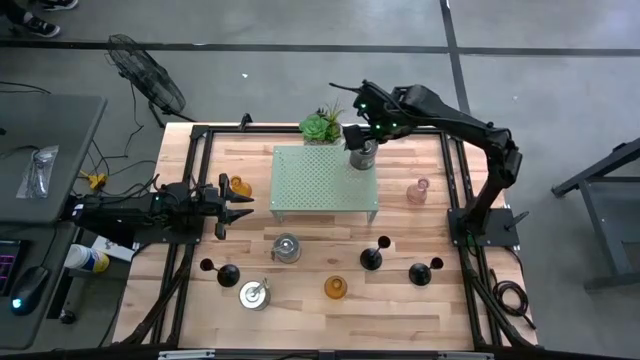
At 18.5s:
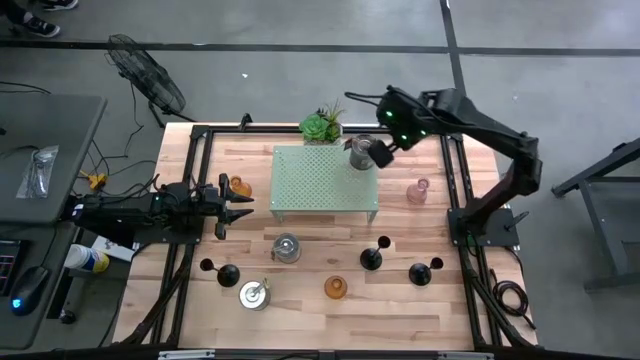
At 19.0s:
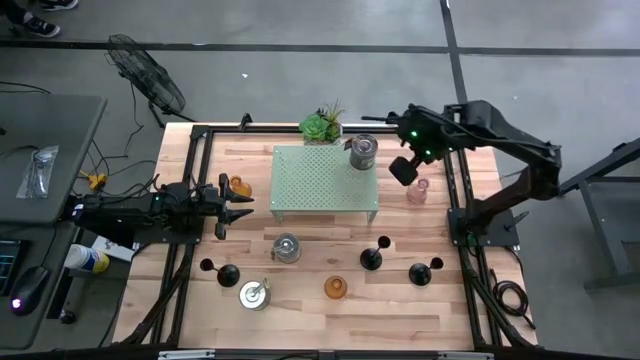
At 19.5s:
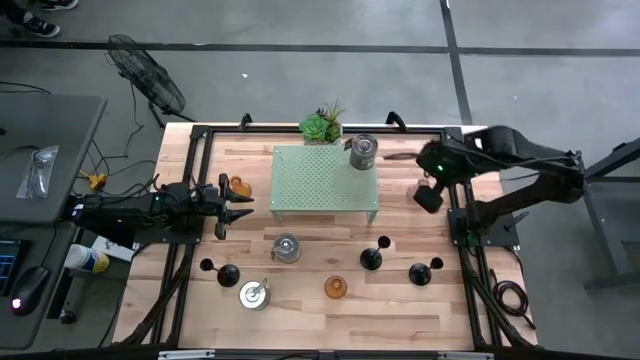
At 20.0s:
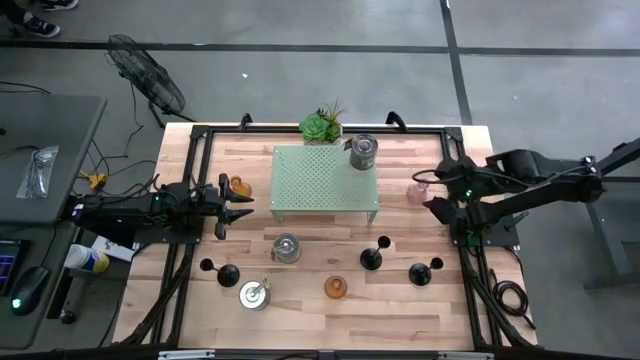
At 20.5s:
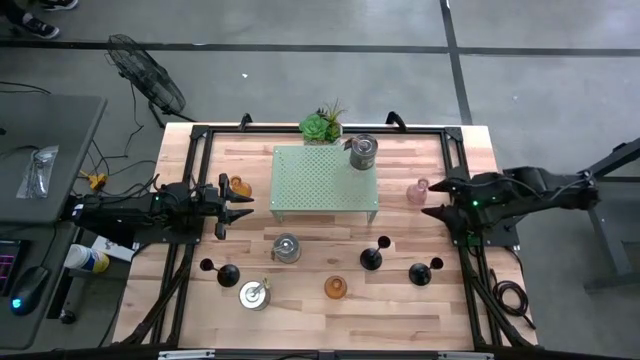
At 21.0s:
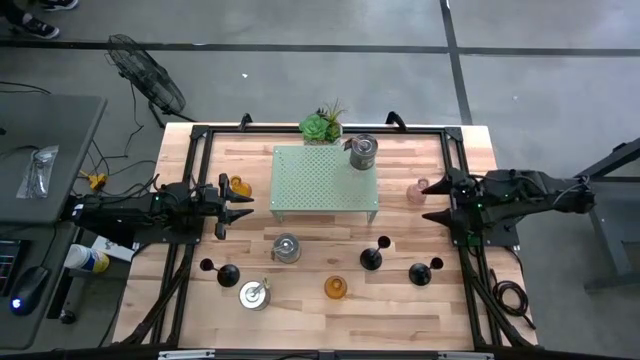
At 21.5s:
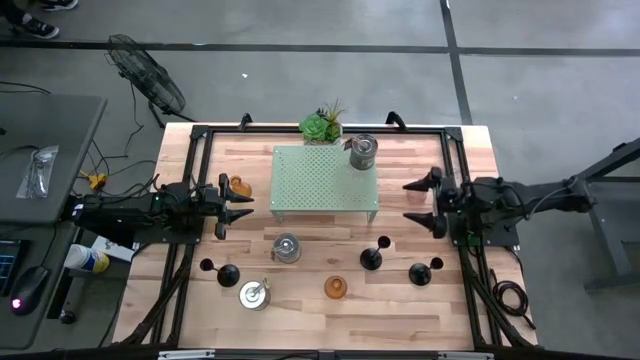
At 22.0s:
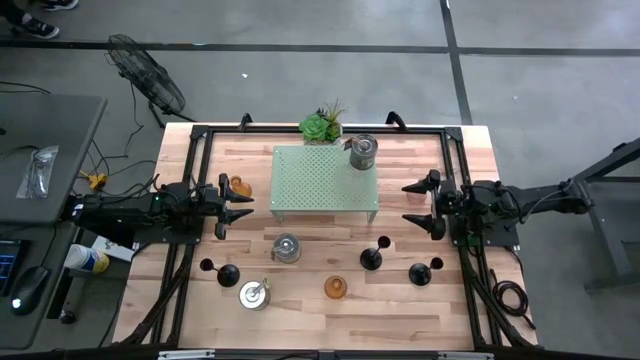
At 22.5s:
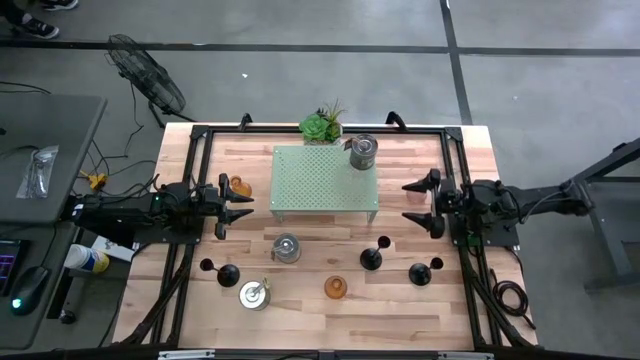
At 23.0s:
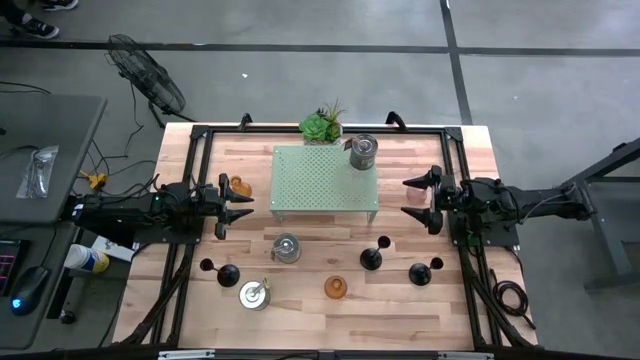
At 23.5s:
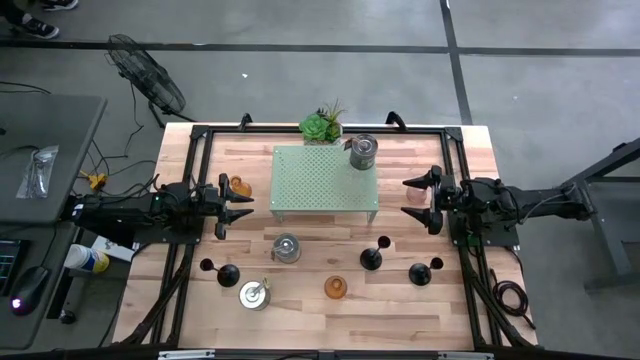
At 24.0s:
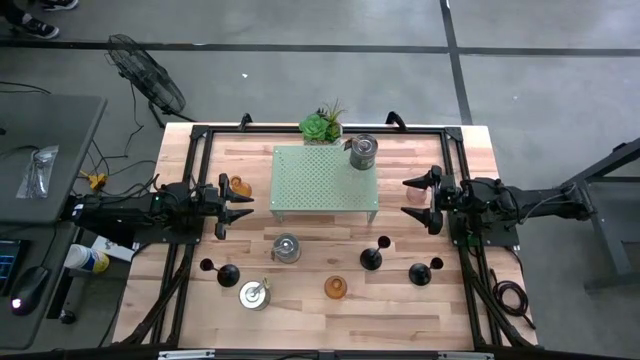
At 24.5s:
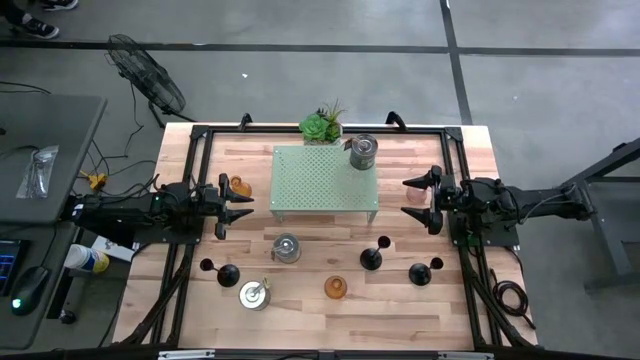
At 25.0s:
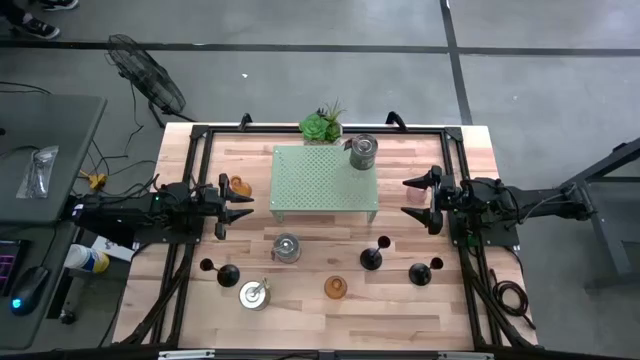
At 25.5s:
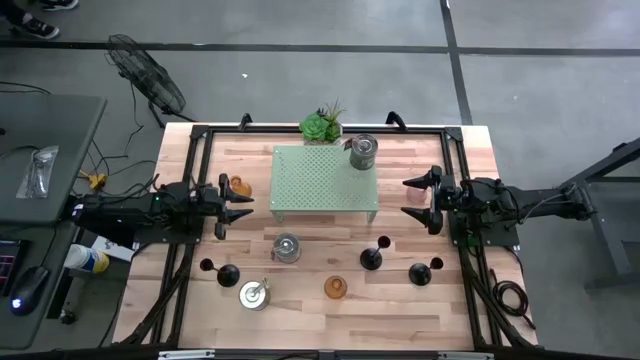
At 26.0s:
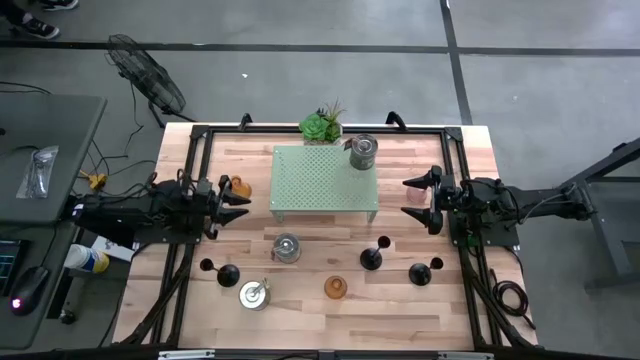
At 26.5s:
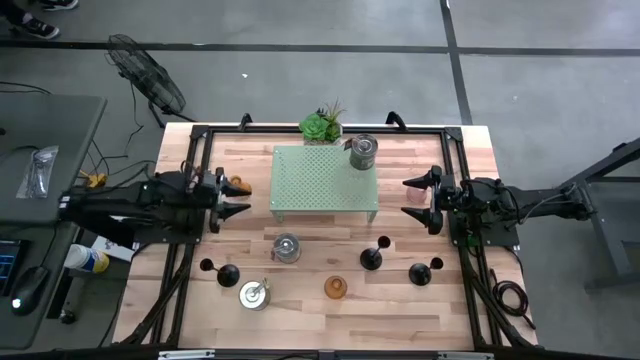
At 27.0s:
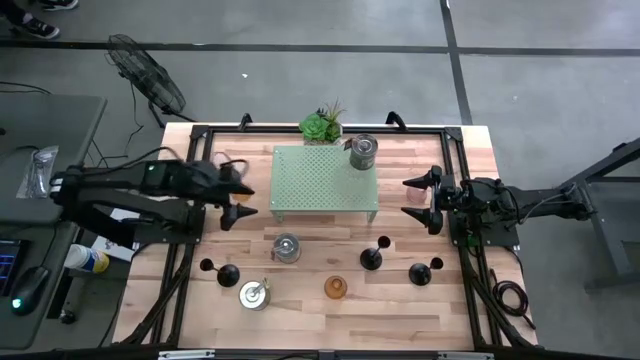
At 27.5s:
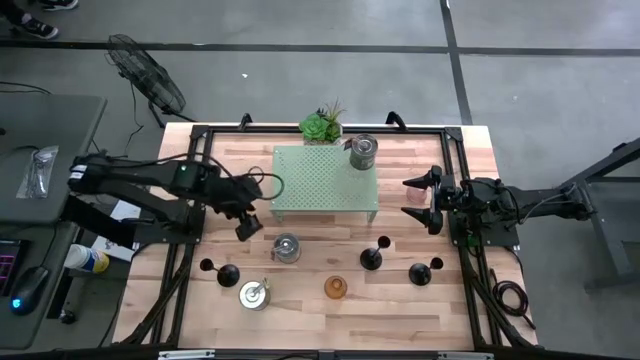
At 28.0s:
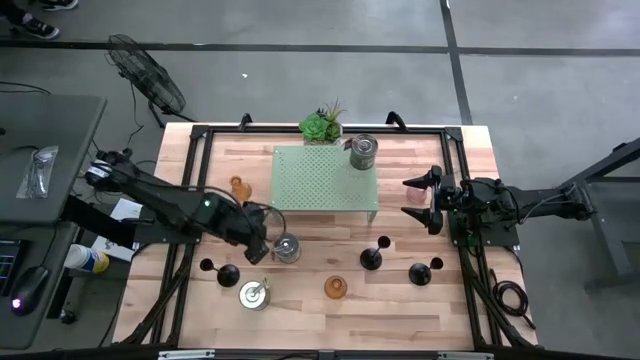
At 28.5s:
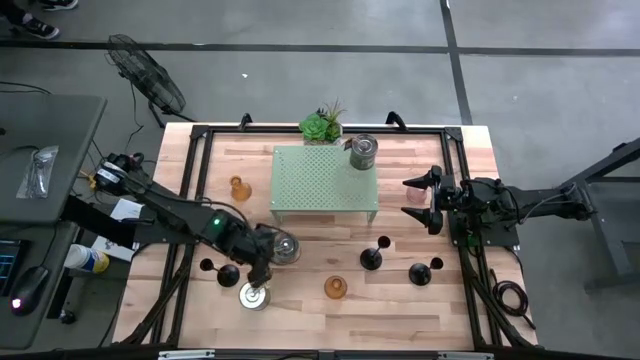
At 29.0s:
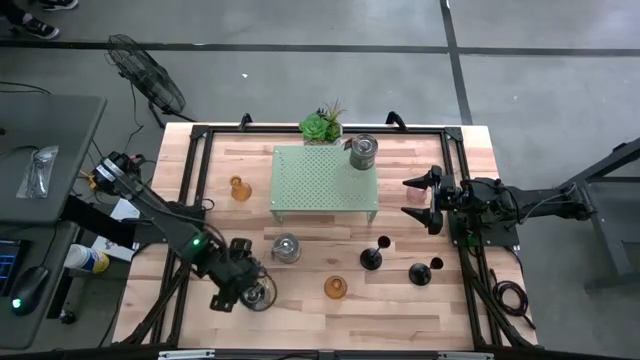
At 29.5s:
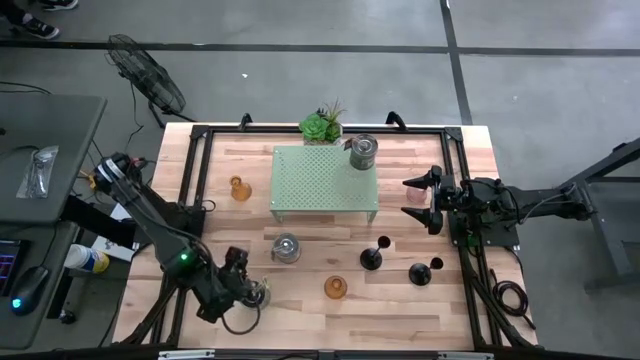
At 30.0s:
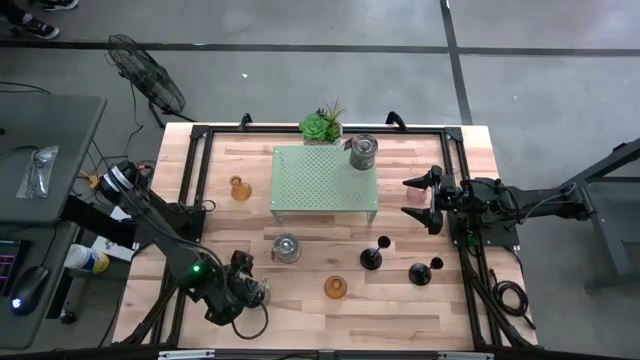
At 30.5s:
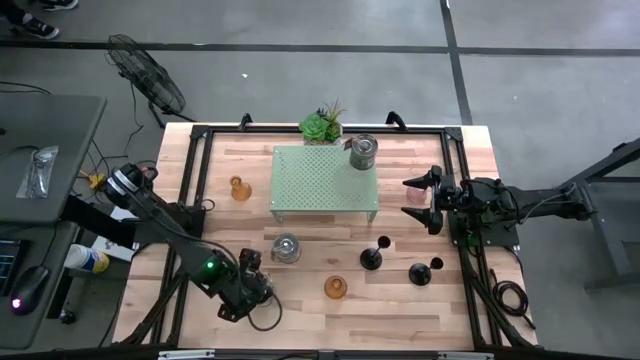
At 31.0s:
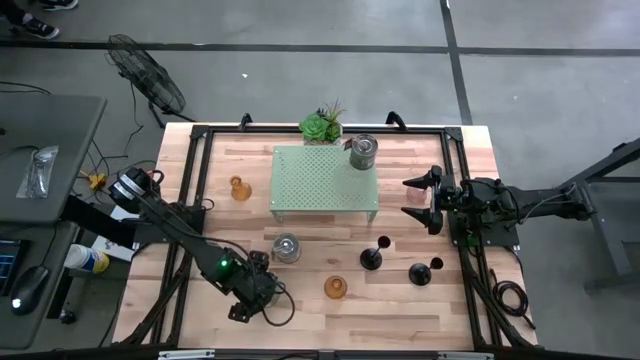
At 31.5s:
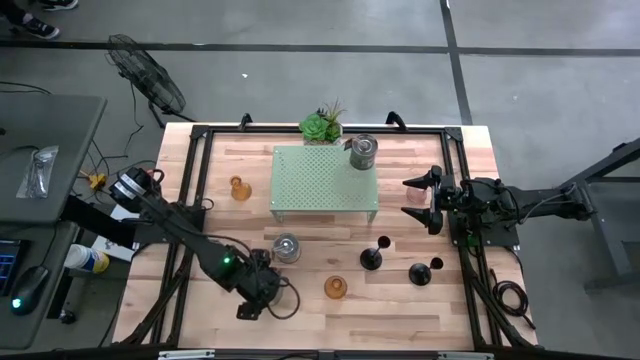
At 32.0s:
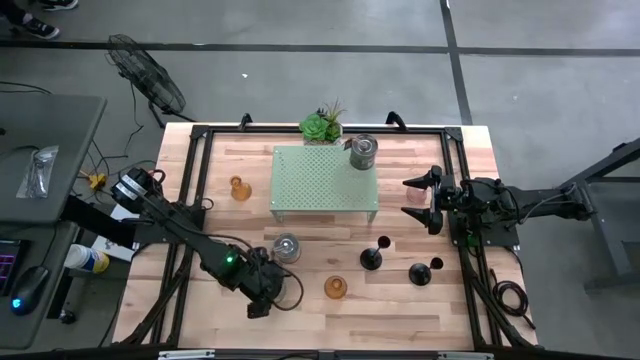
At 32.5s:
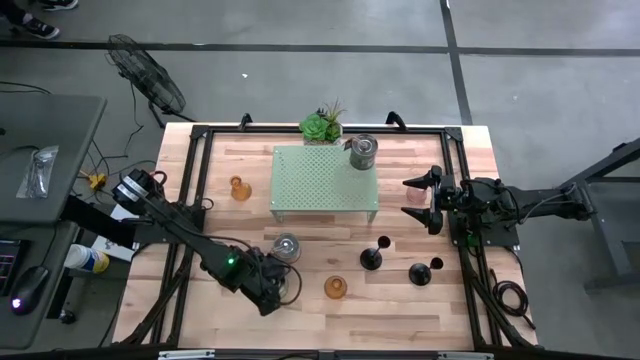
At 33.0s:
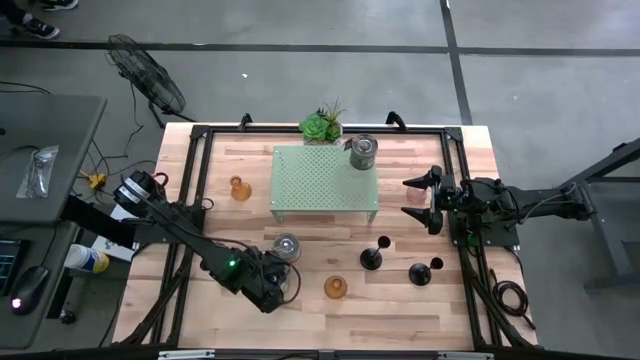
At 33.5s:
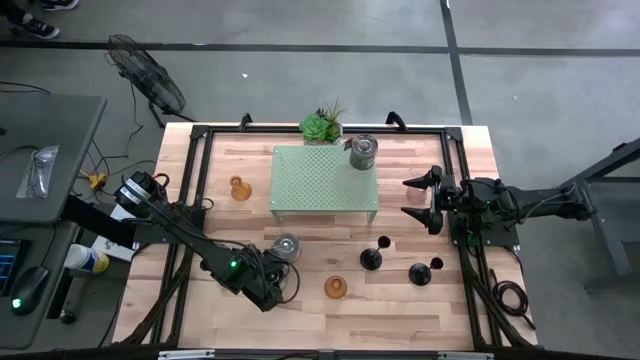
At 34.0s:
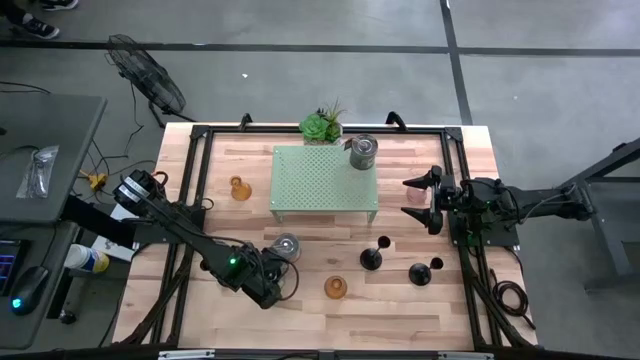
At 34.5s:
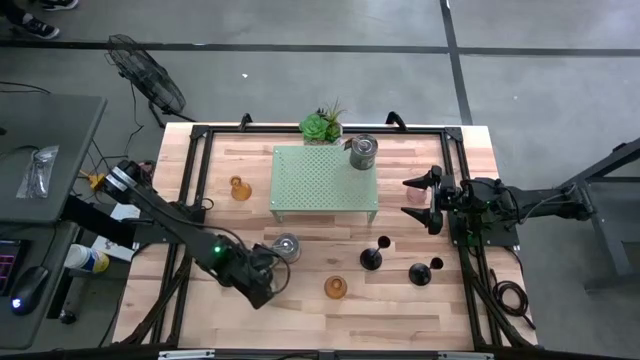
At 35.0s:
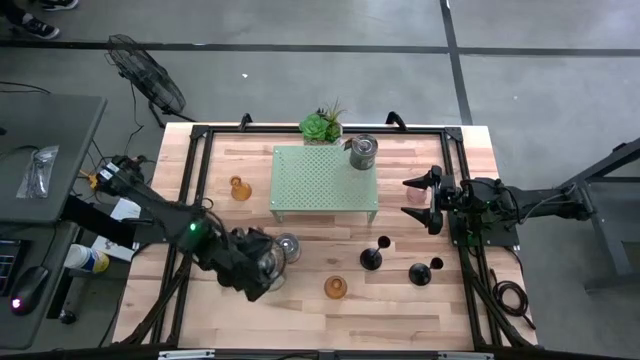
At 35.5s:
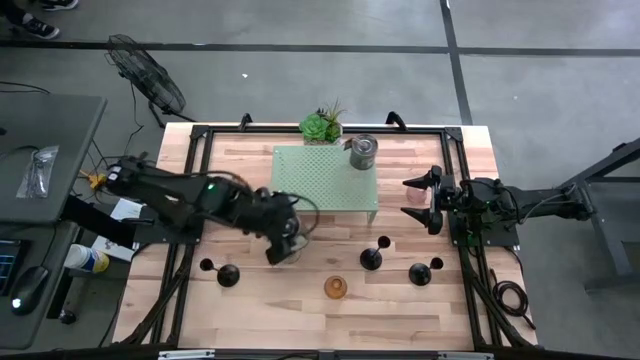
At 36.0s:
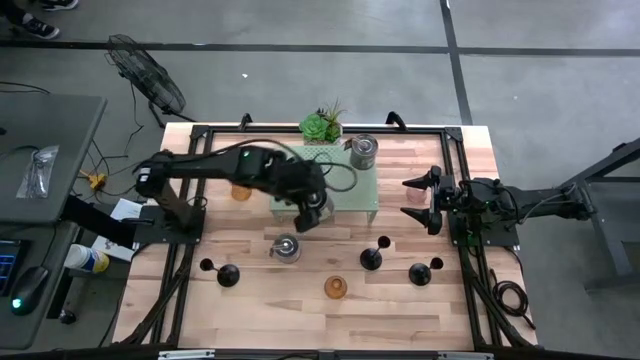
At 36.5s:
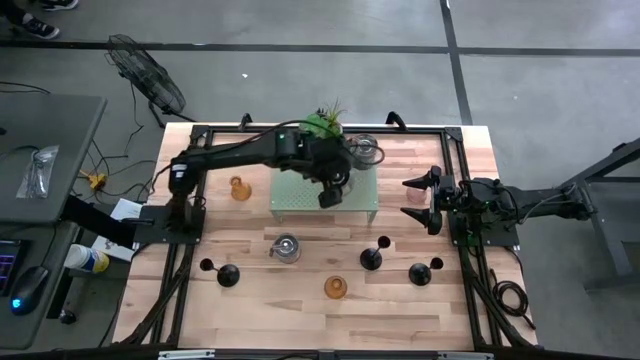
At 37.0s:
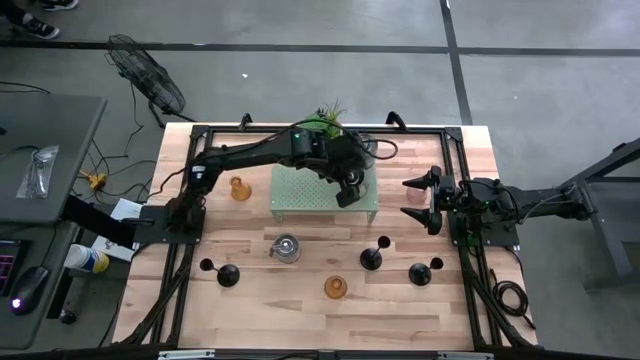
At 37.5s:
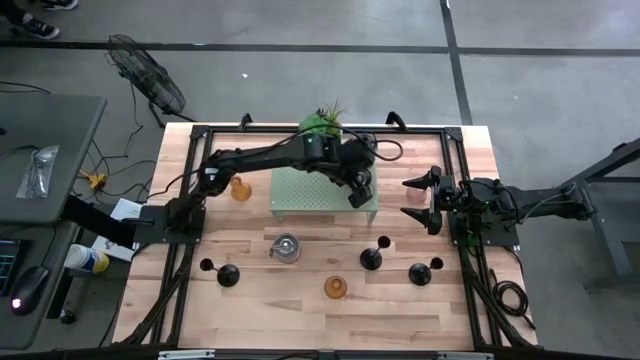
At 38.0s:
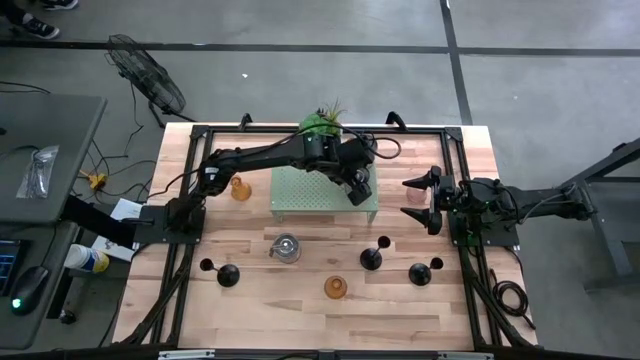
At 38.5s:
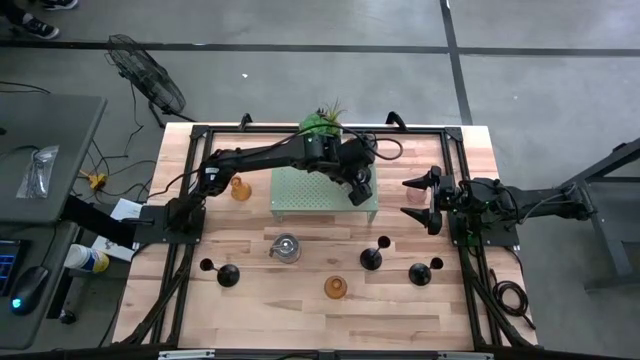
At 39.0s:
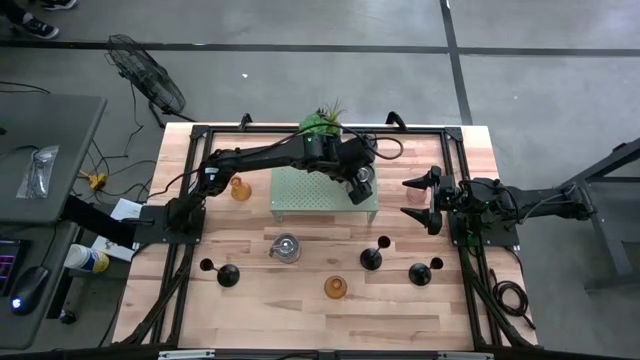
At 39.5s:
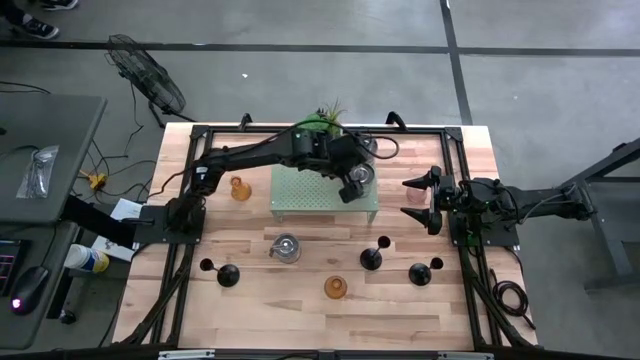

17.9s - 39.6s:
Task: Pick & Place candle stick holders
Put the bottom silver scented candle on the shelf
